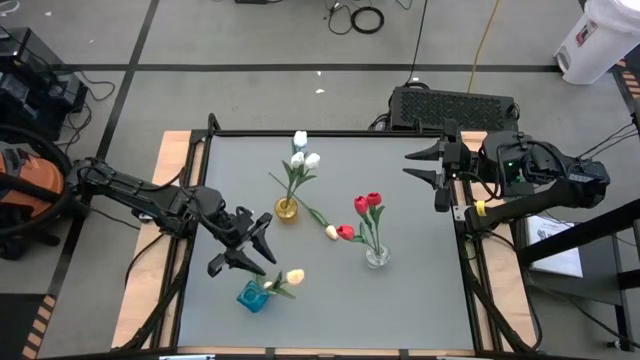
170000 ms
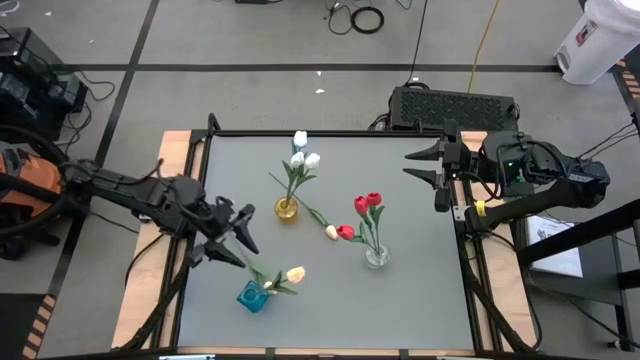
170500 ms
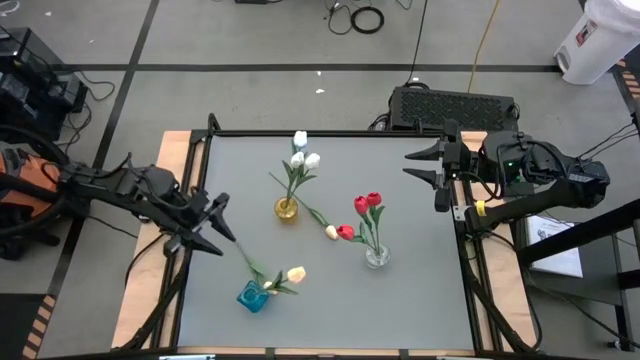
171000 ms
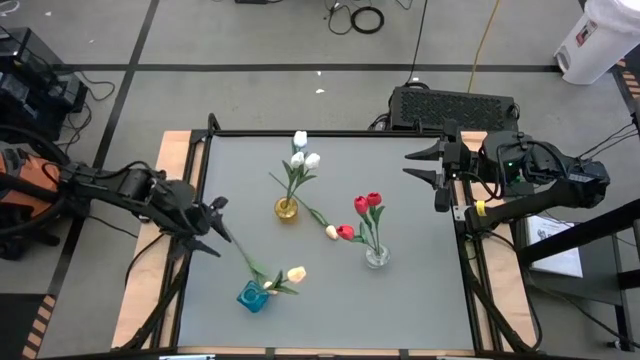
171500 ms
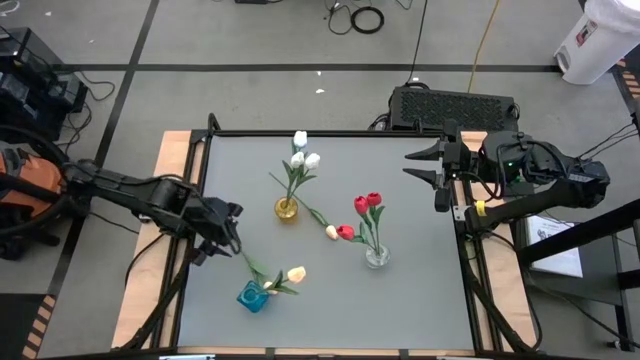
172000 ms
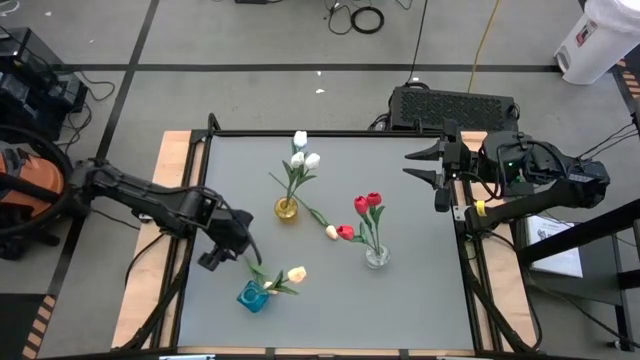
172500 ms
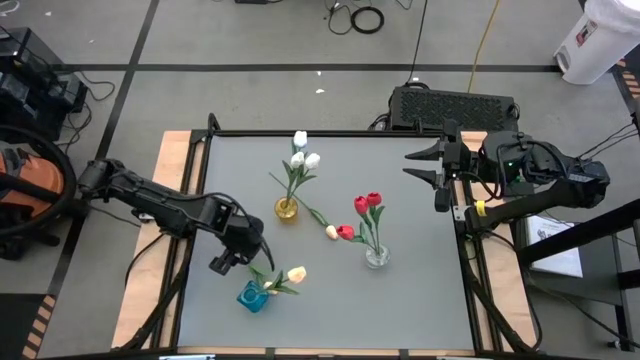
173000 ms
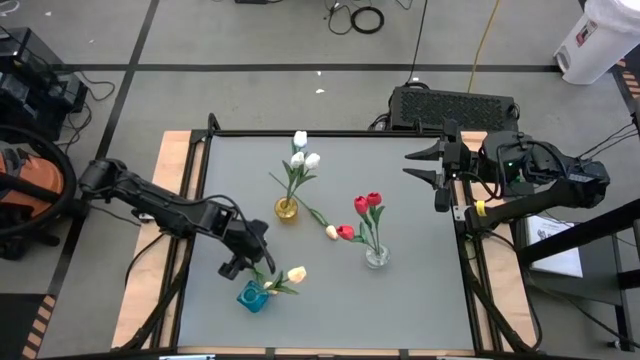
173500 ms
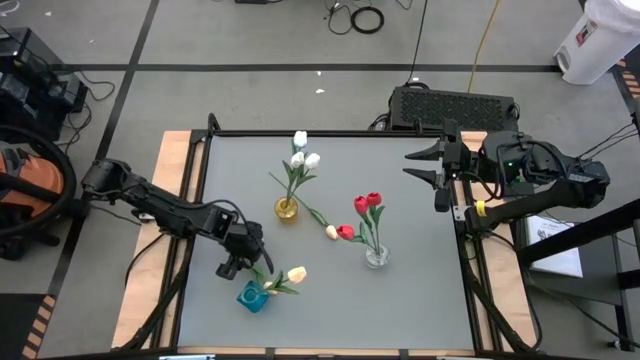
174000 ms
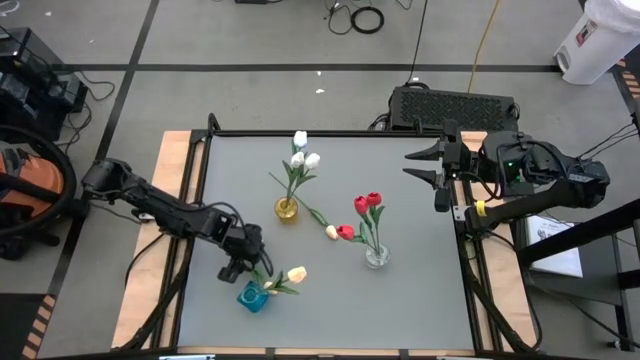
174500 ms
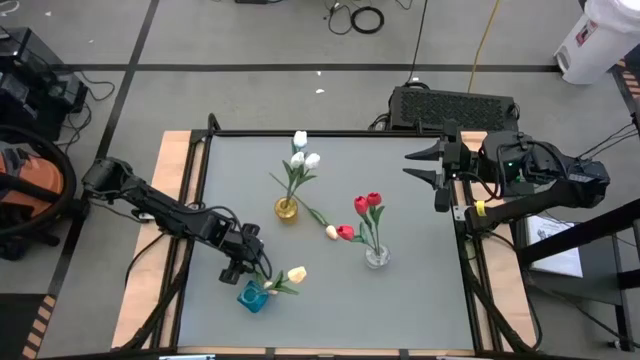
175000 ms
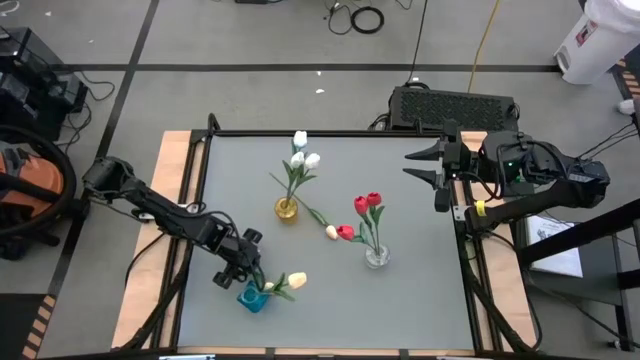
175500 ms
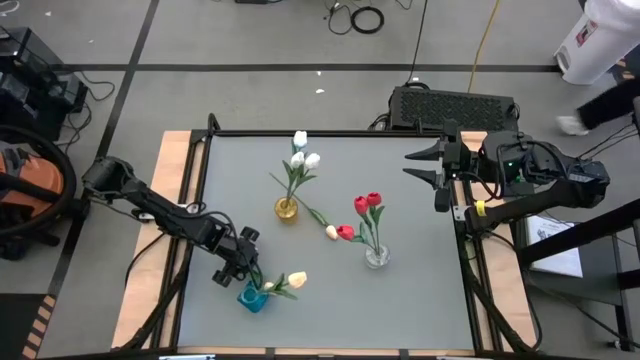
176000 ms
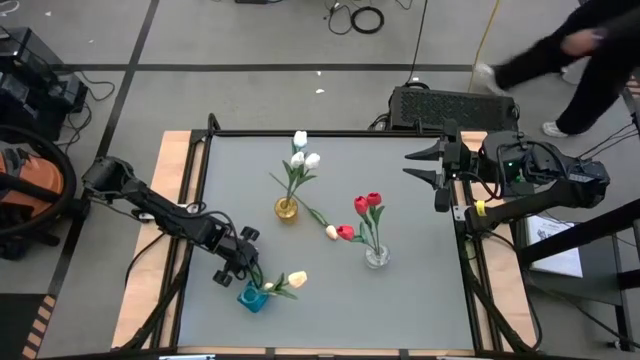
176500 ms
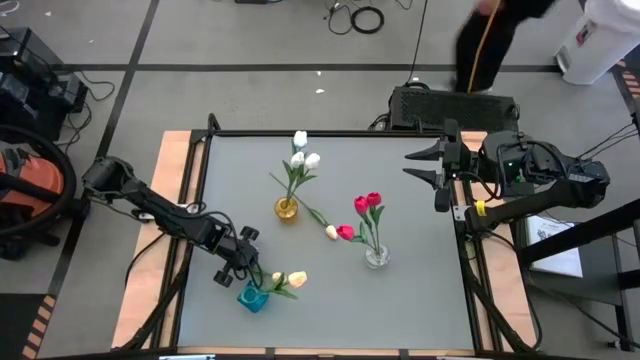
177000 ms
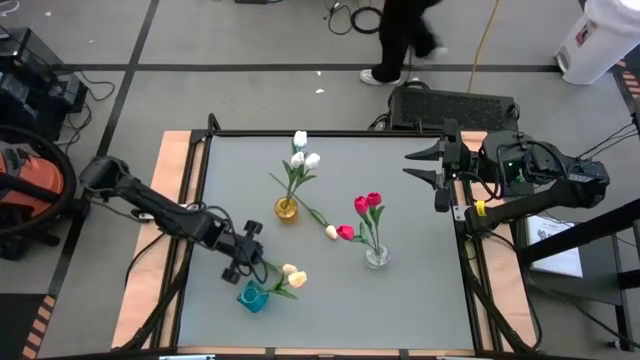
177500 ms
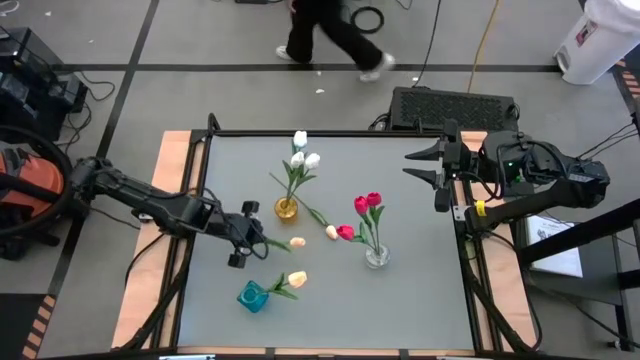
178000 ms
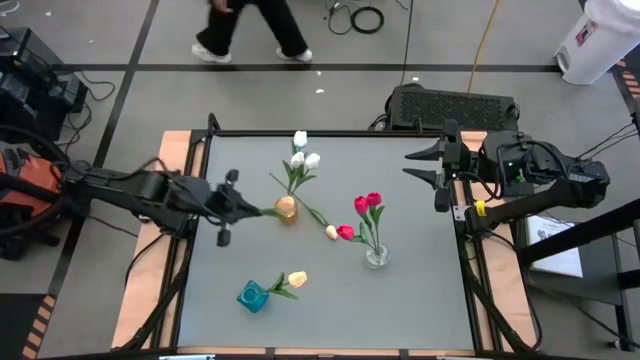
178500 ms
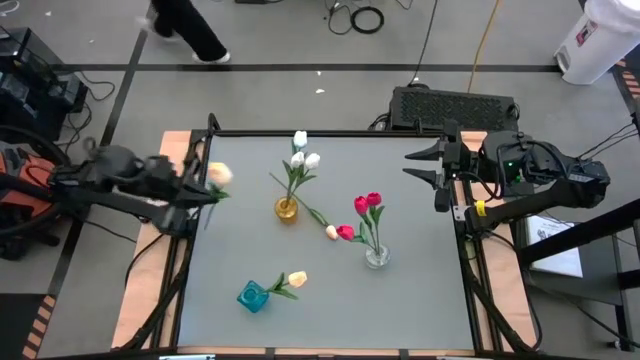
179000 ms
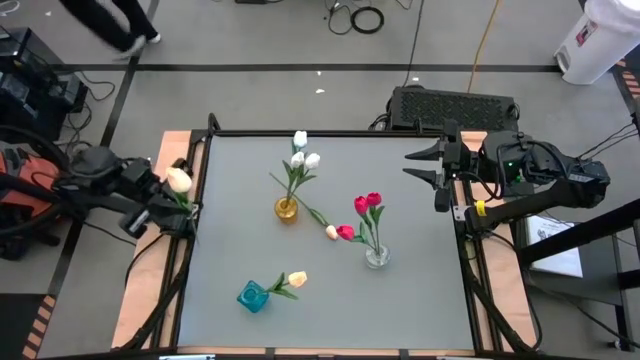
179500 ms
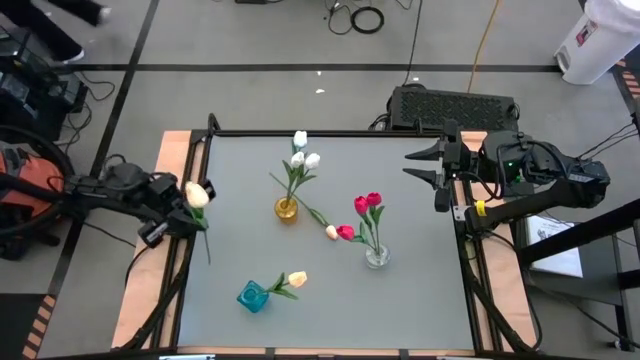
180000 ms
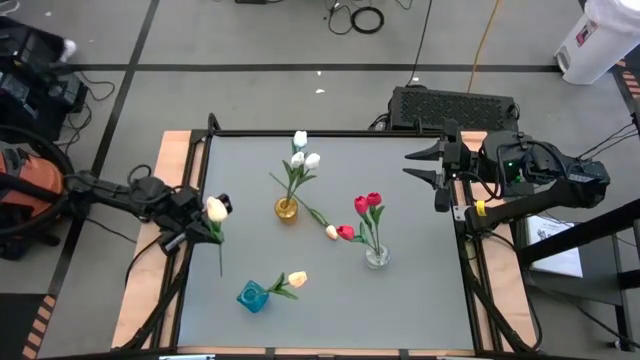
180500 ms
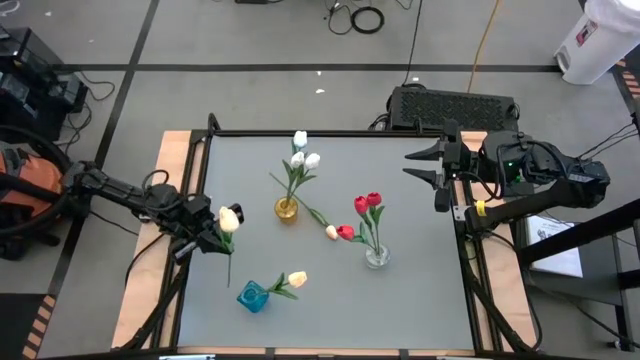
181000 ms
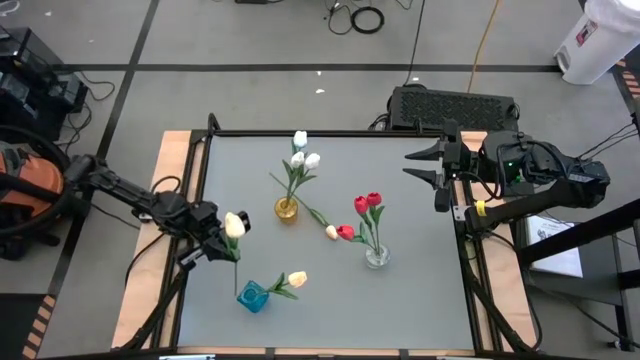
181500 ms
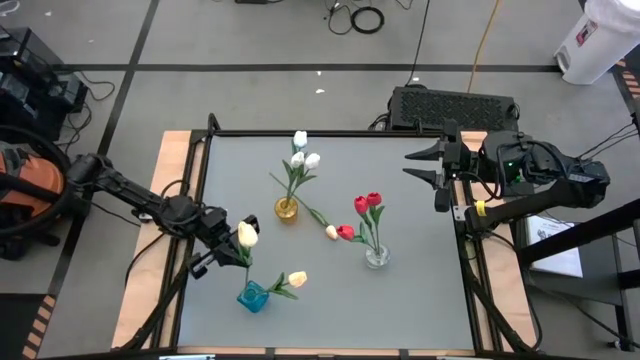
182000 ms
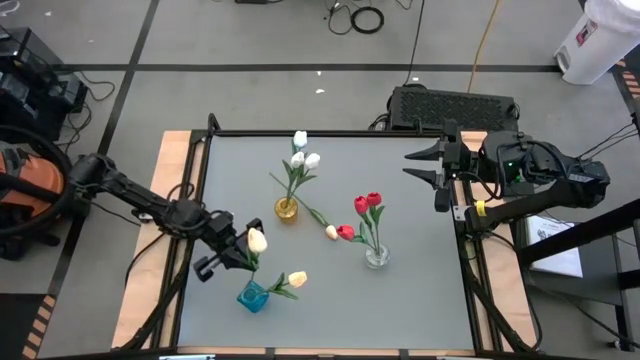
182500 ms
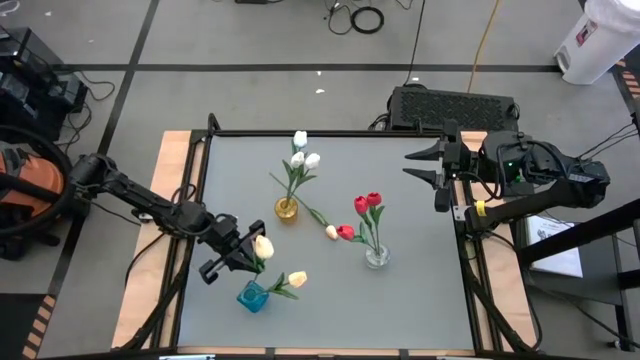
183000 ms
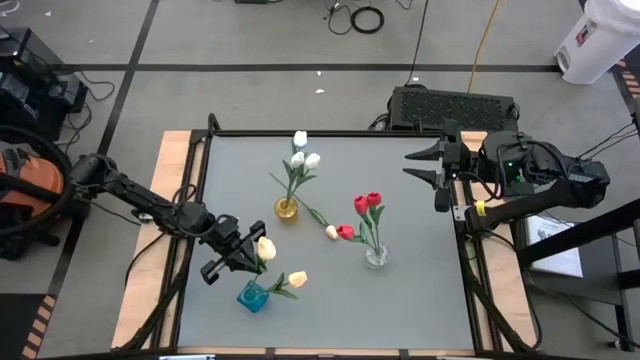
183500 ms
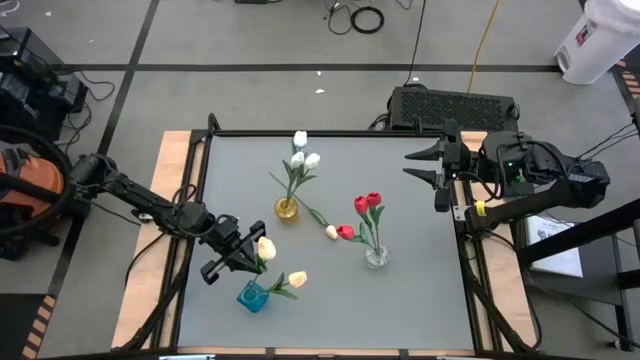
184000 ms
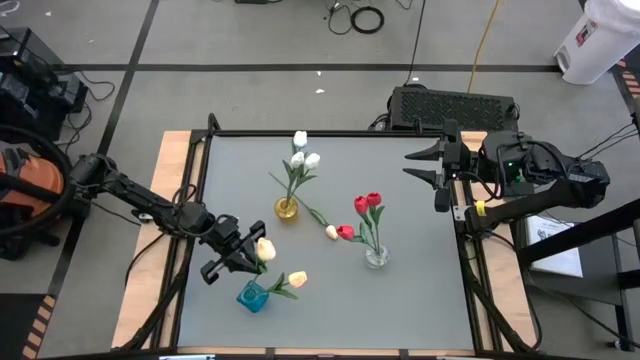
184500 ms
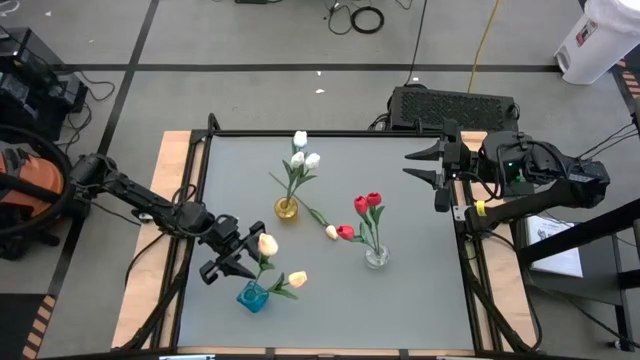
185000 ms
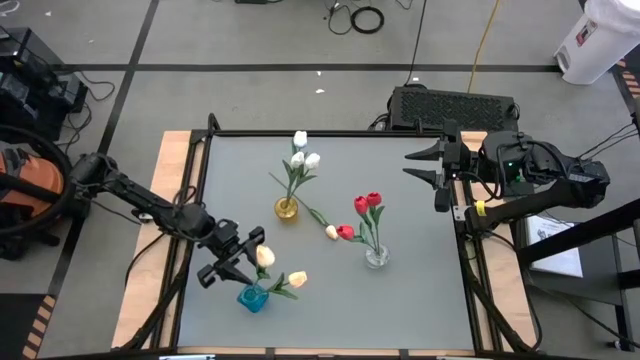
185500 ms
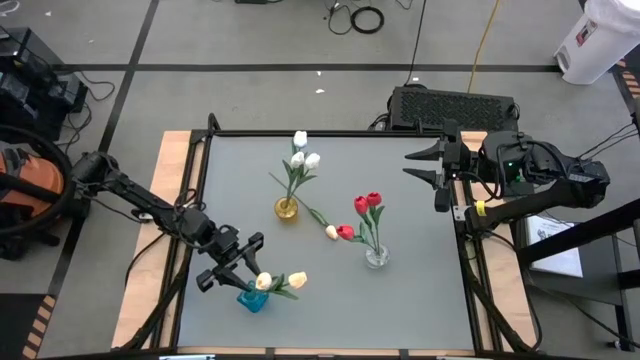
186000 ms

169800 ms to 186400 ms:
Task: Sort flowers into vase by color
Put the bottom yellow tulip into the blue vase

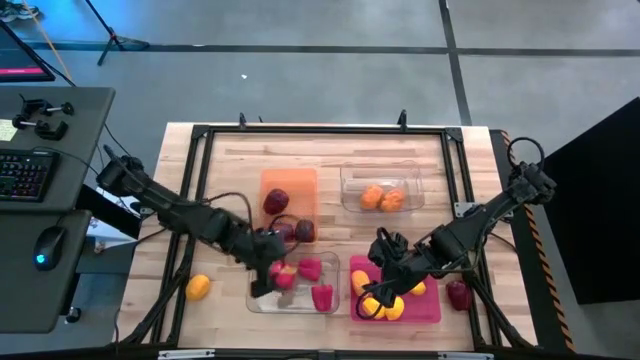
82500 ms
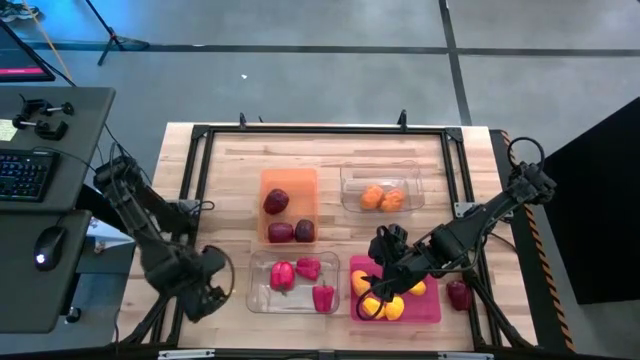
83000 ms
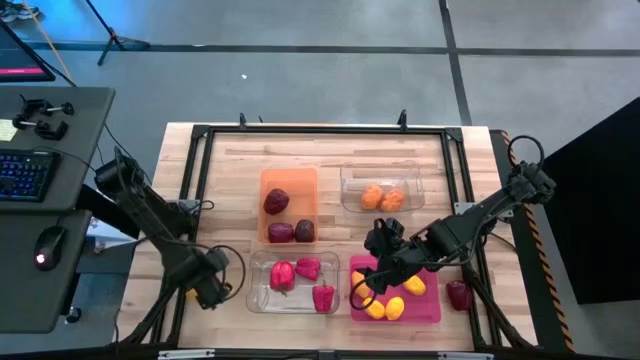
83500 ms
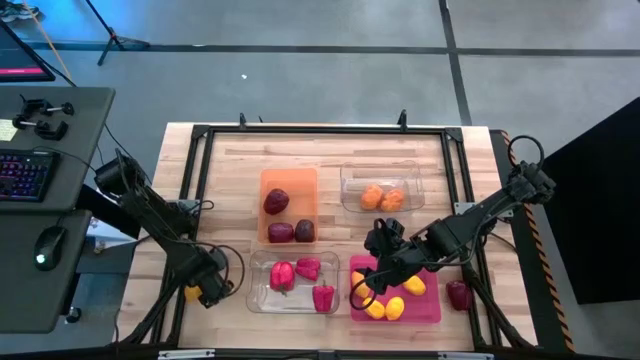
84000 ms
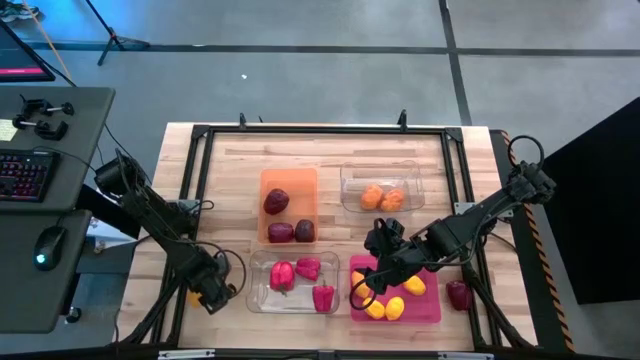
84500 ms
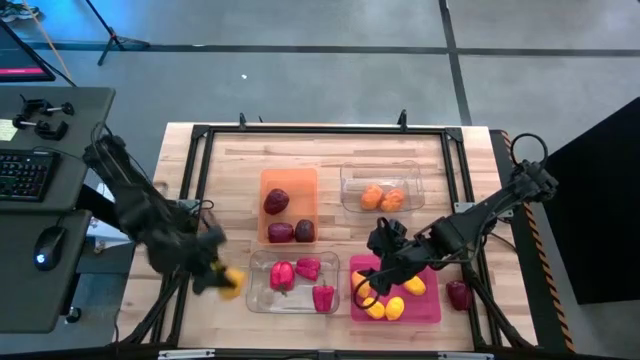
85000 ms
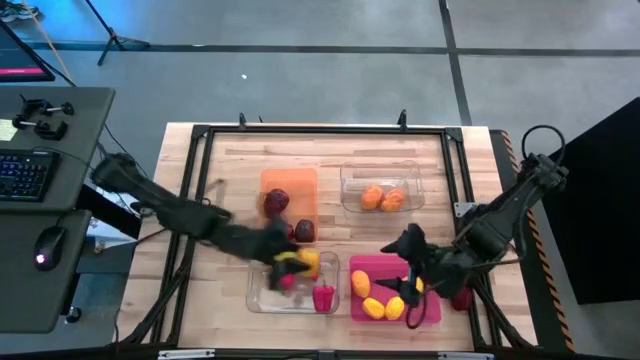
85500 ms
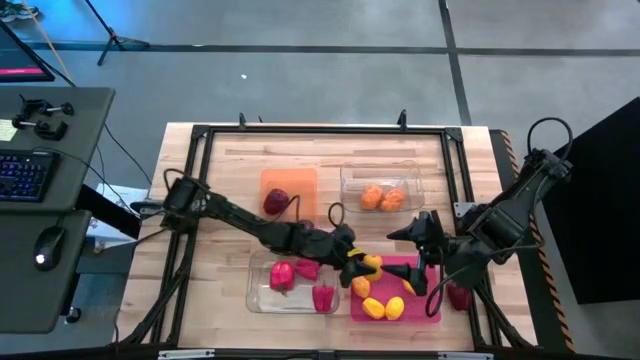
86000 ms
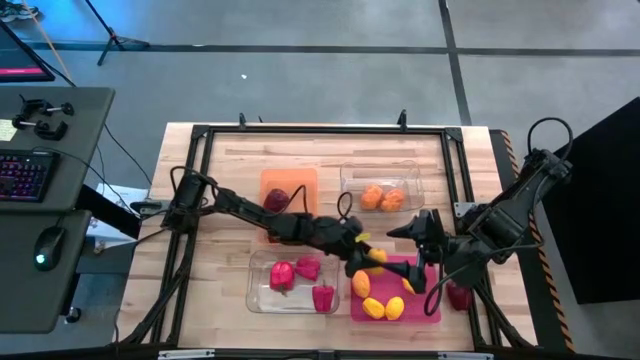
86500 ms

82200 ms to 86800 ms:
Task: Sort produce into baskets
Put the lemon into the pink bin
